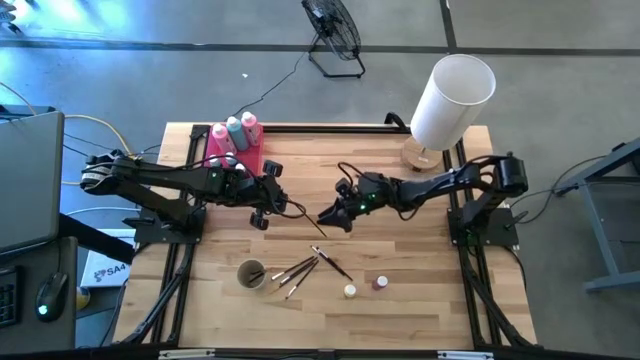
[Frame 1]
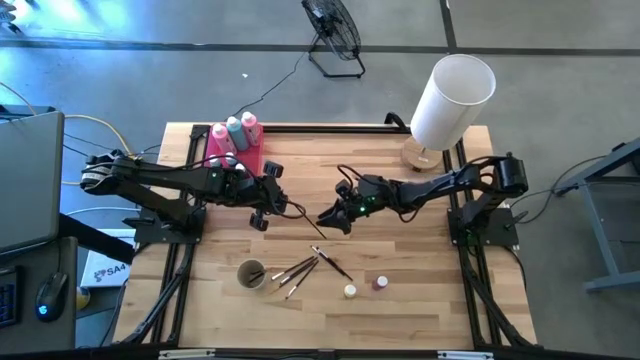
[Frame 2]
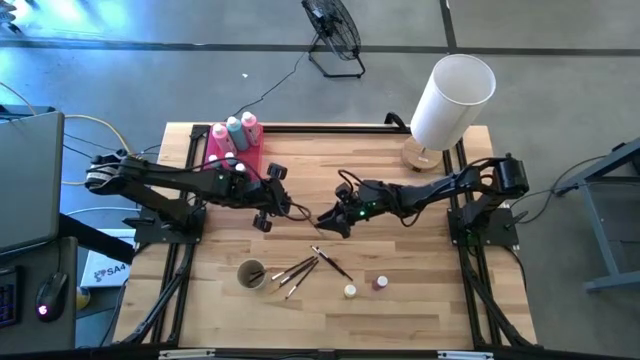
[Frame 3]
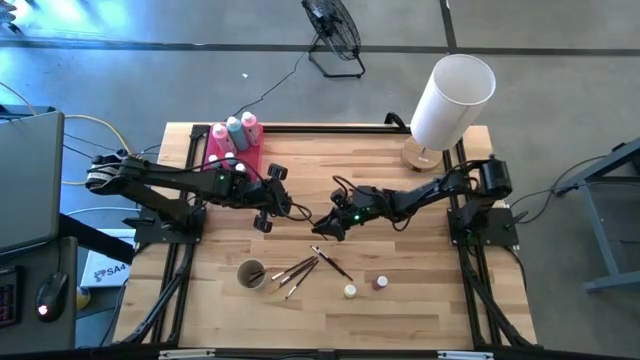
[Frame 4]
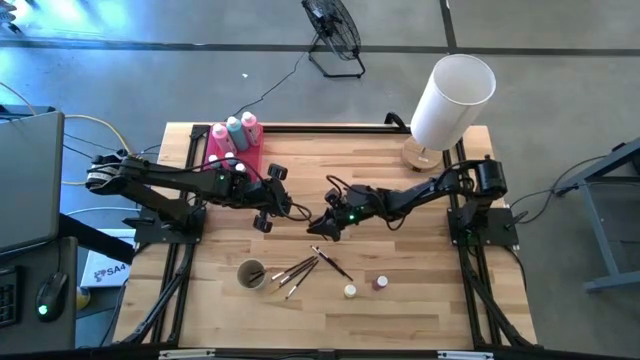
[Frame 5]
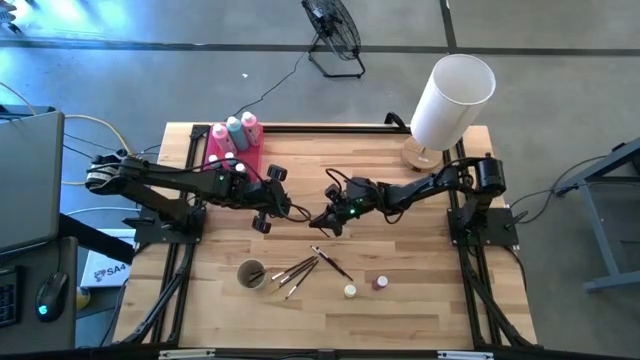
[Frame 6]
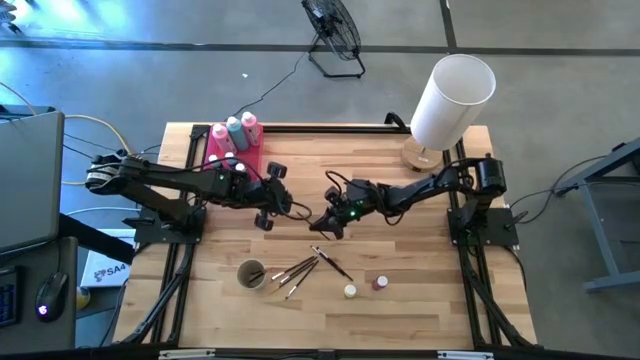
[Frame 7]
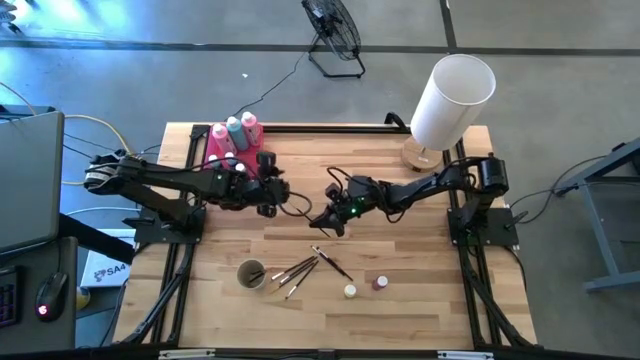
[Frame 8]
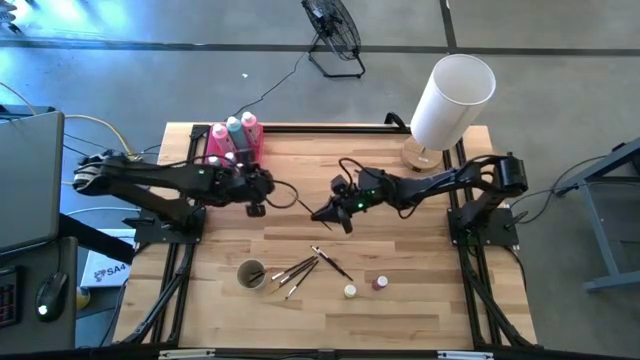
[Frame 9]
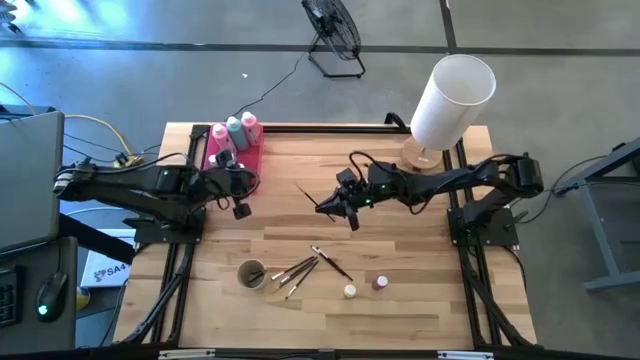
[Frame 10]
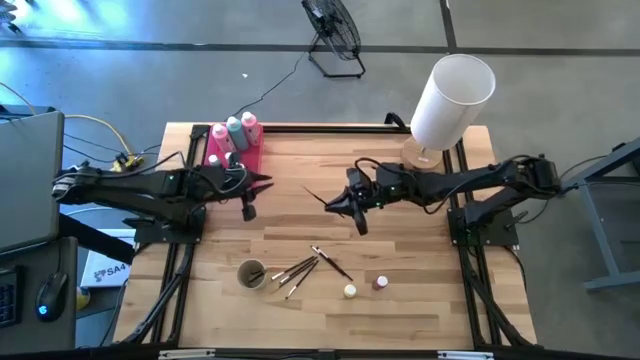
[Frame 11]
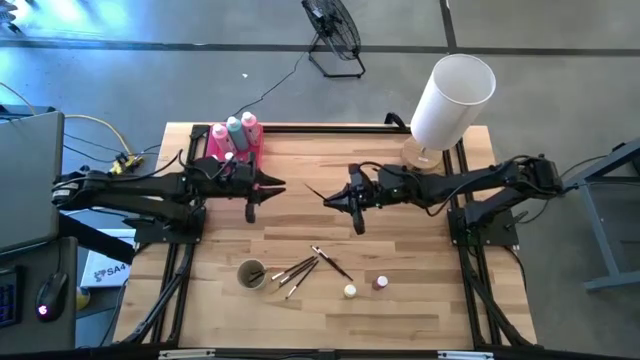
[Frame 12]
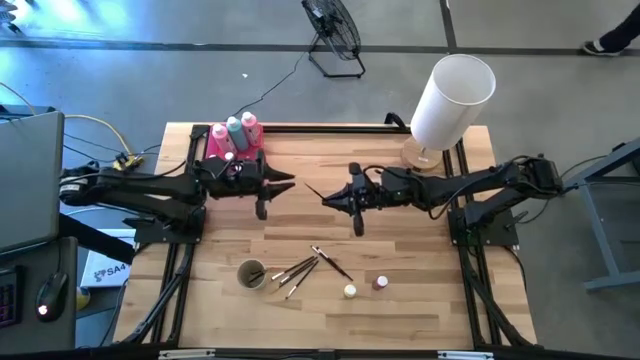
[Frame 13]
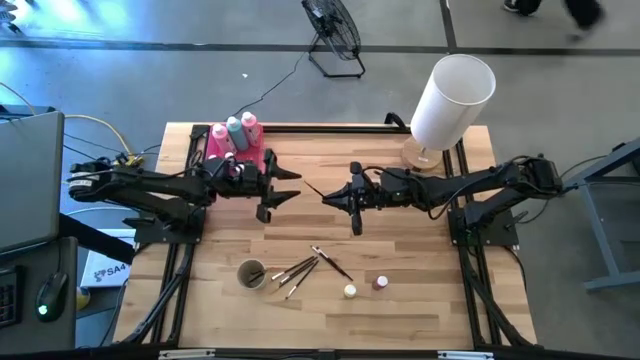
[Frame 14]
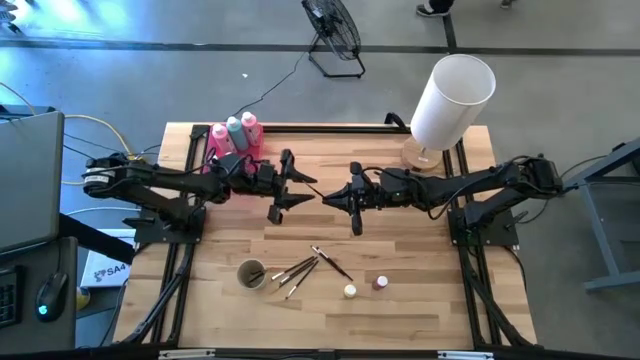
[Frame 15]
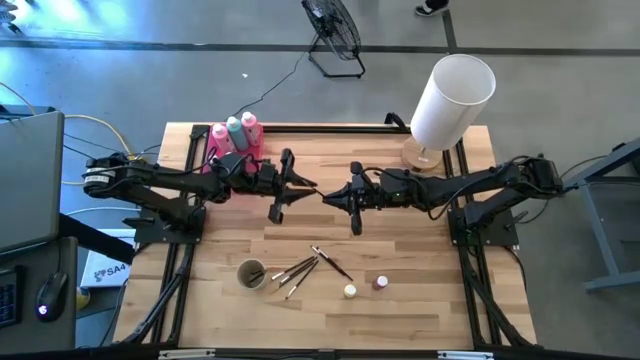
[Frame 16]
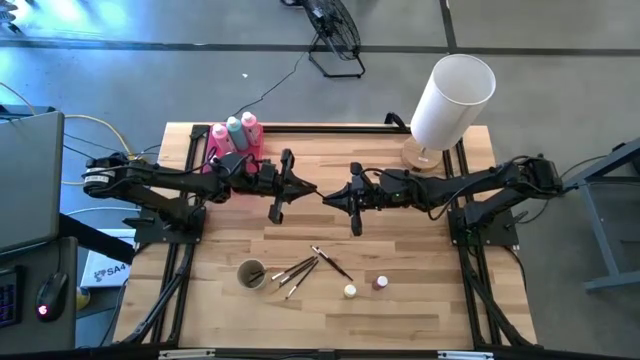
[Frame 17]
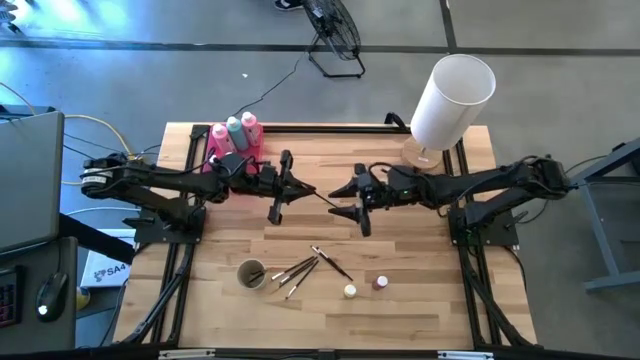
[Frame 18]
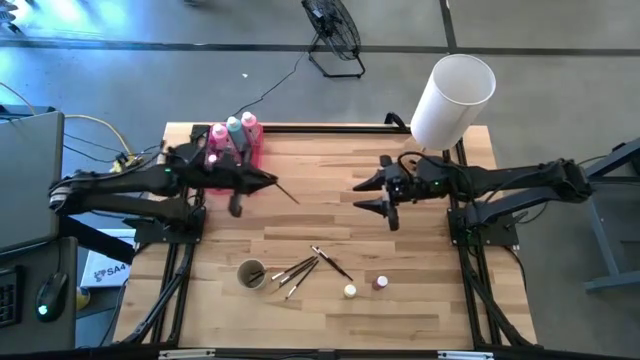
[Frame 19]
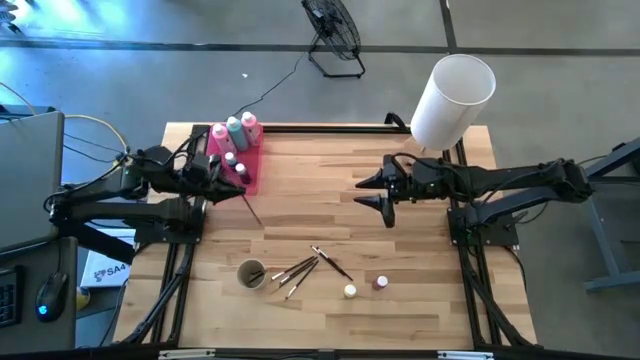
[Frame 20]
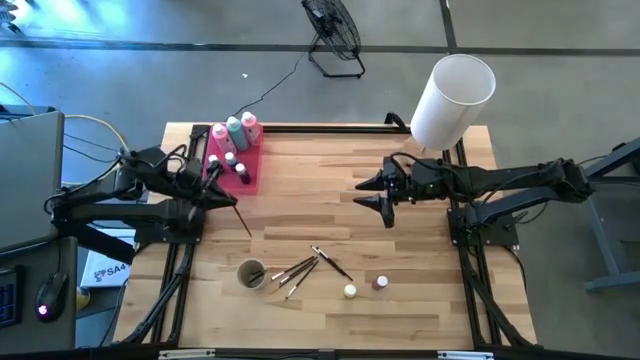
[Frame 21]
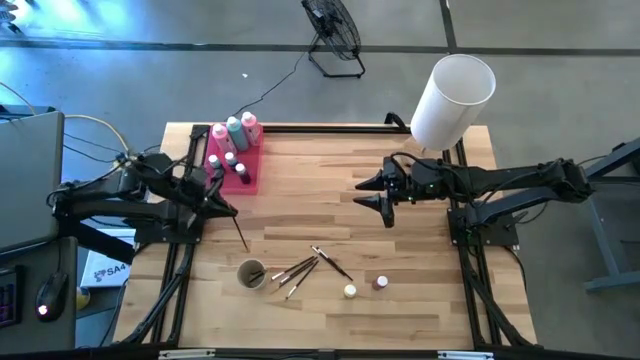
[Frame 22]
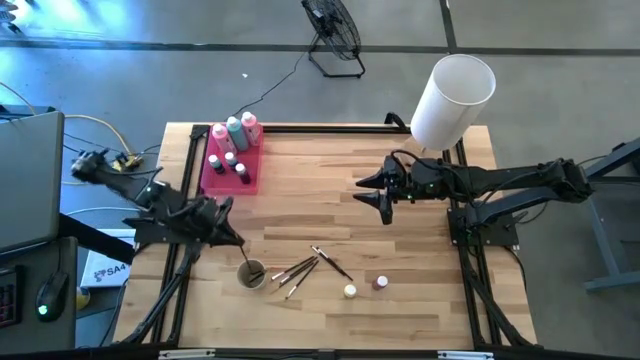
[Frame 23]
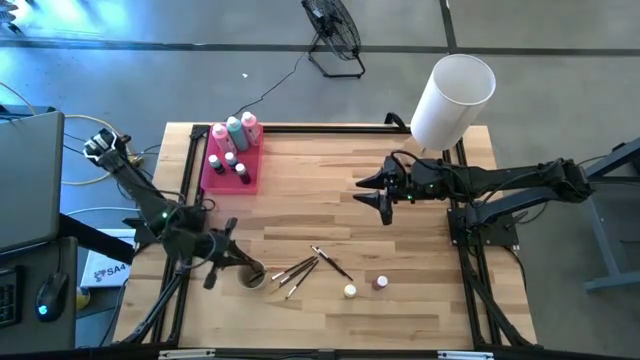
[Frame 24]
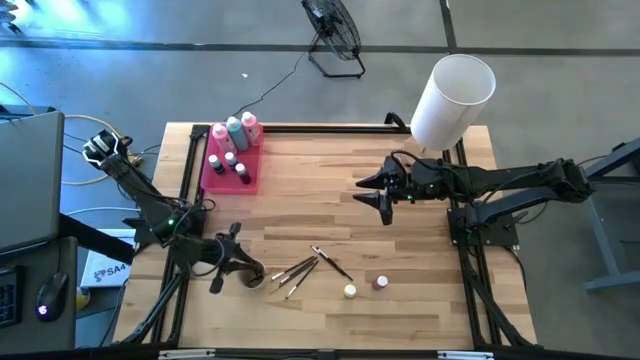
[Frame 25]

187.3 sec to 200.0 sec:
Task: Pick & Place Paint Supplies
Put the gold paintbrush into the light brown cup

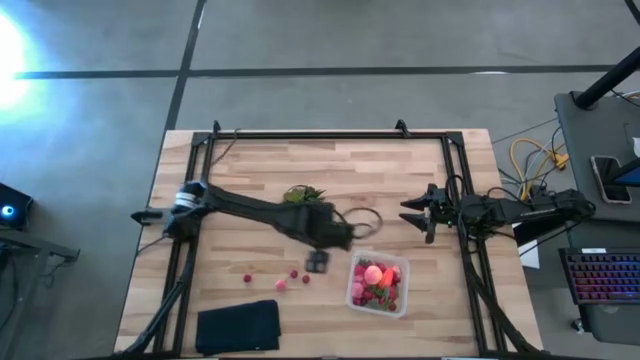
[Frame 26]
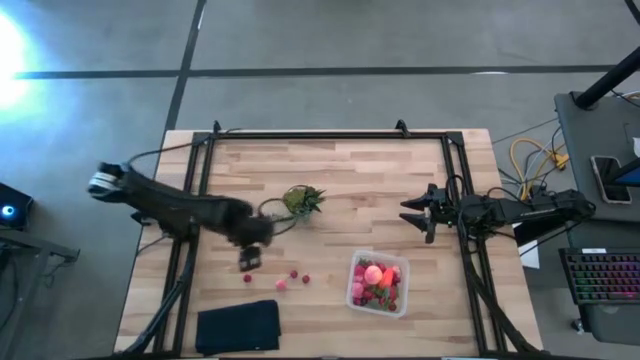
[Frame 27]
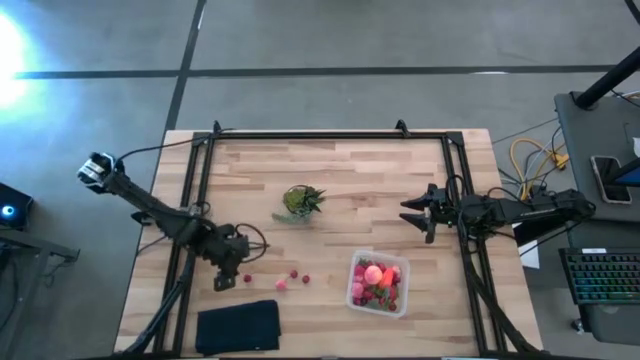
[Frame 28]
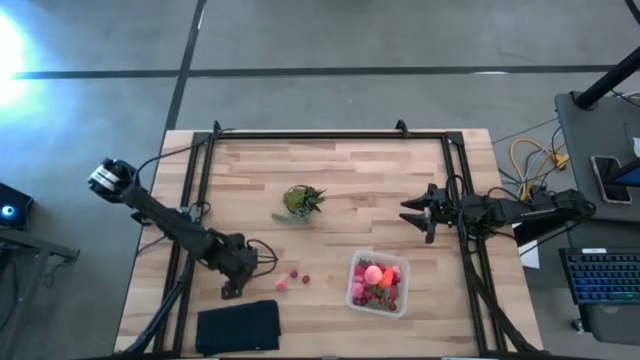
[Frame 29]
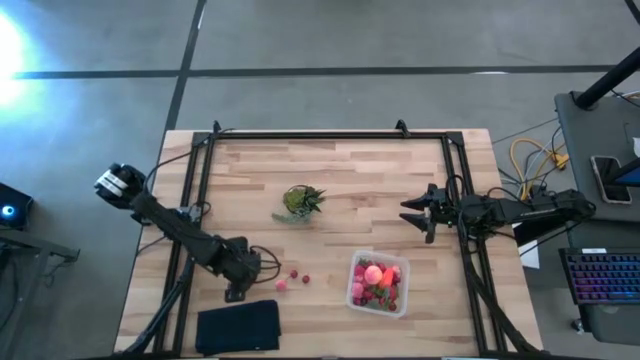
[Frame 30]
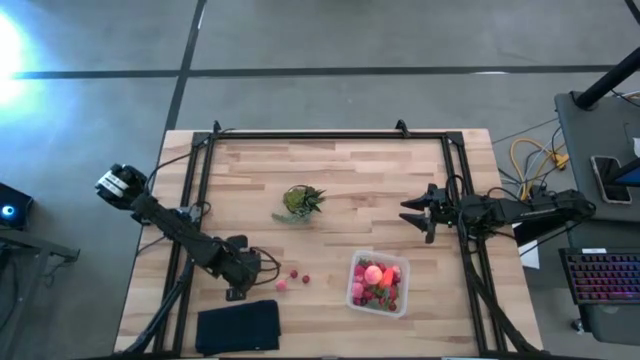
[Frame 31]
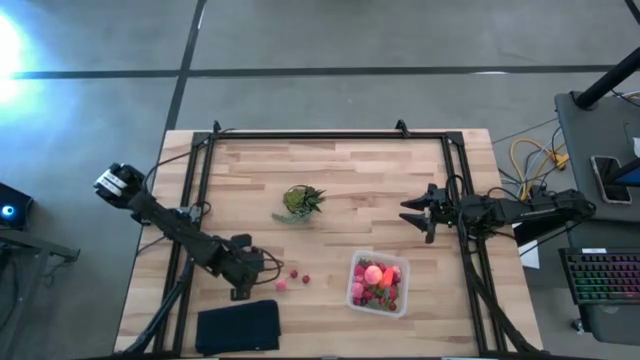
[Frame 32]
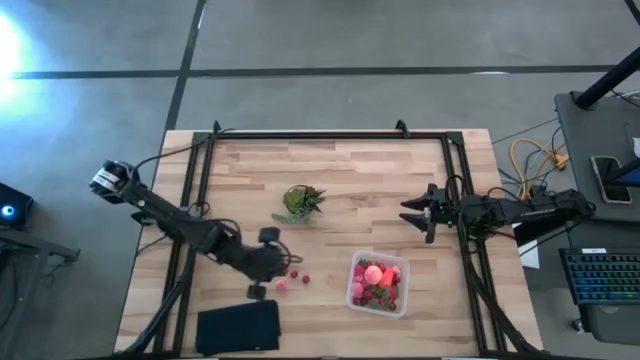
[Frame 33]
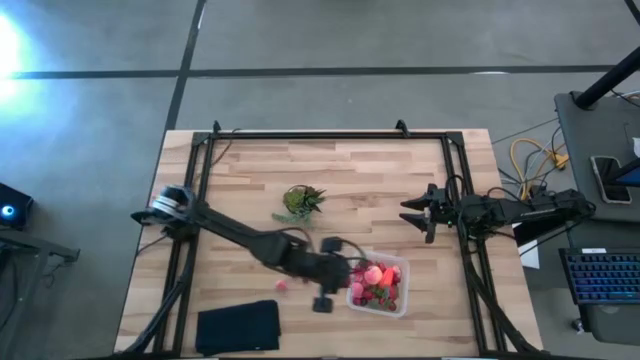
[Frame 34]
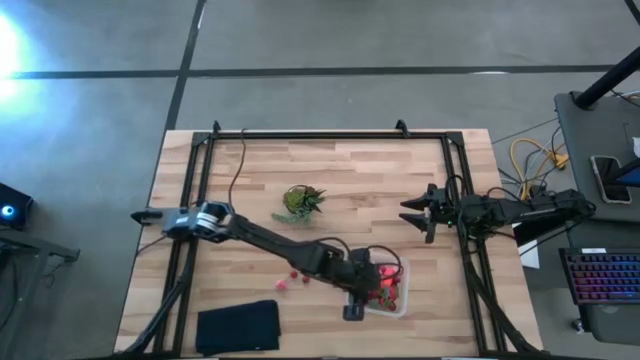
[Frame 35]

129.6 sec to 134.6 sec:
Task: Pick and placing Produce into tupperware
Put the left cherry into the bin

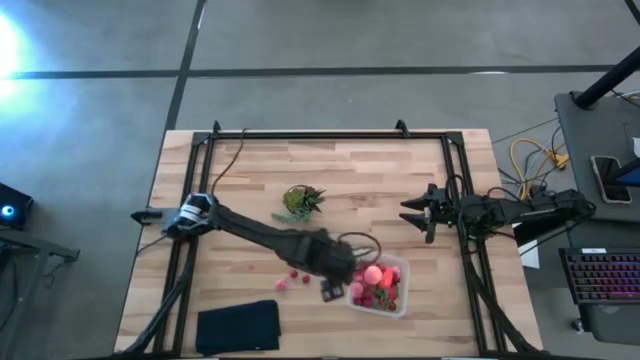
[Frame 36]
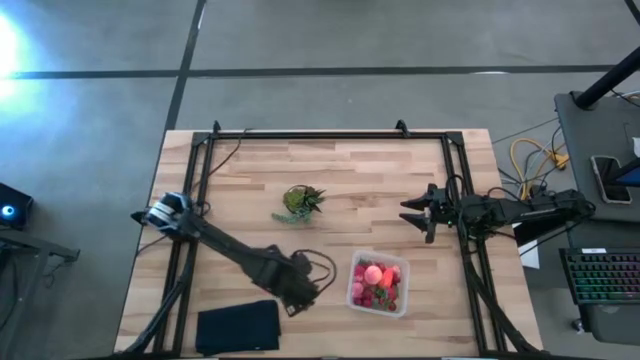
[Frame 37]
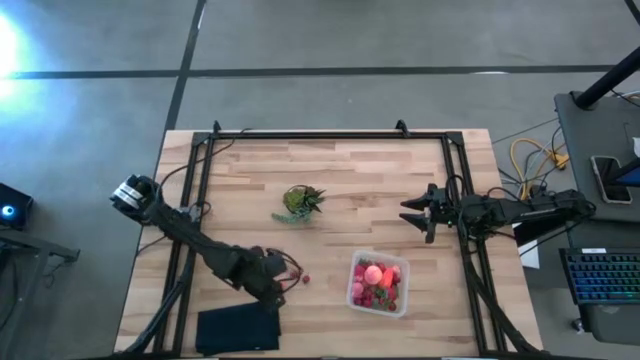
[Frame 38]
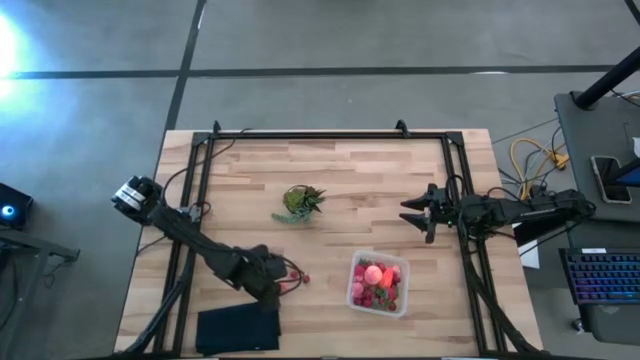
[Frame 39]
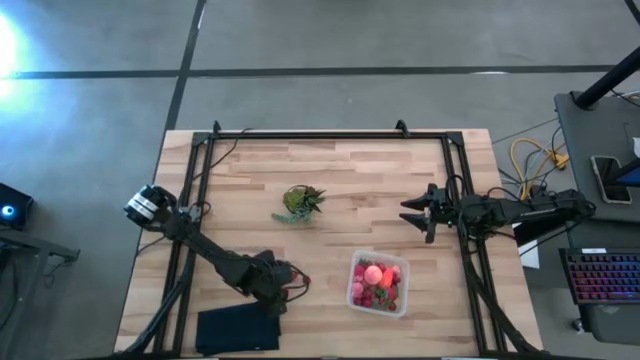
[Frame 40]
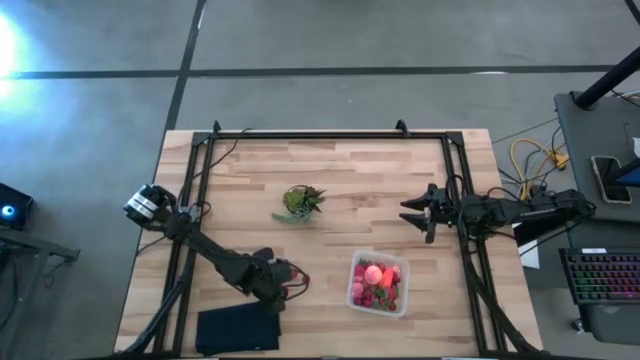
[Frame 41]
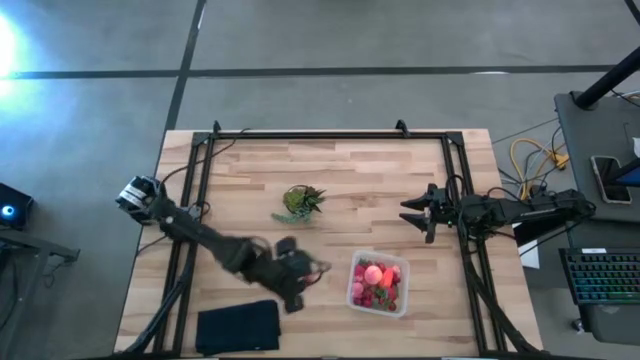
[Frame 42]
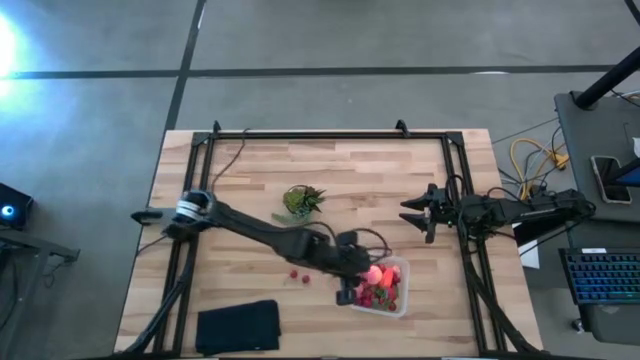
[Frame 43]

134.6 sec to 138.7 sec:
Put the apricot into the bin
